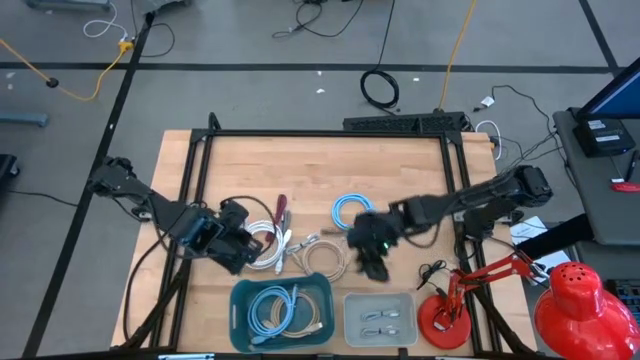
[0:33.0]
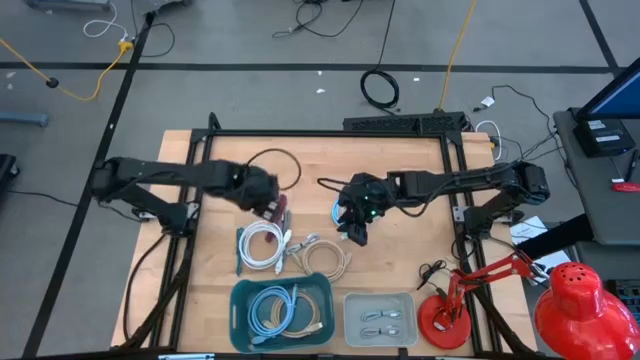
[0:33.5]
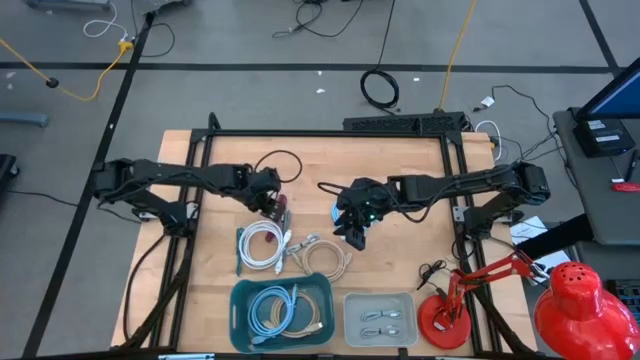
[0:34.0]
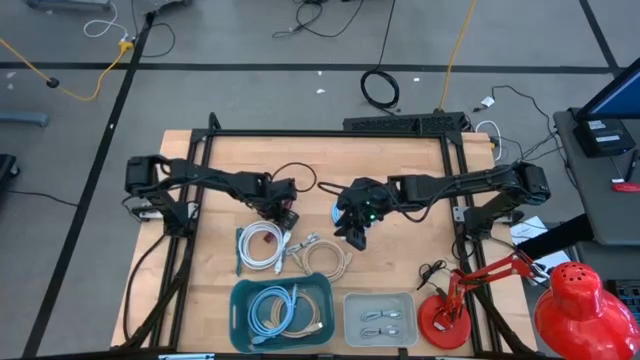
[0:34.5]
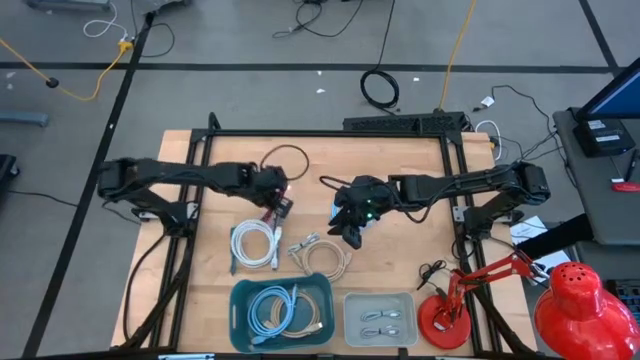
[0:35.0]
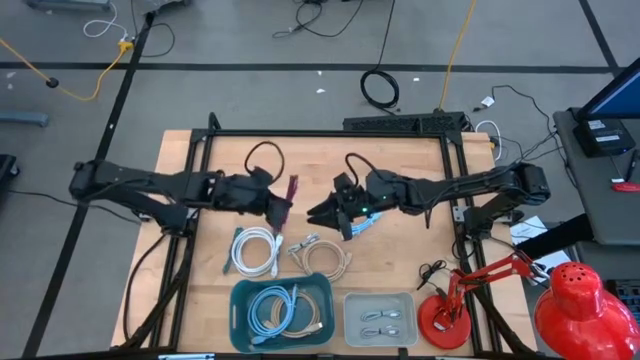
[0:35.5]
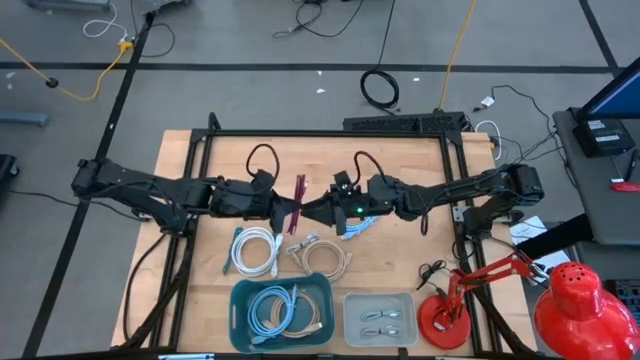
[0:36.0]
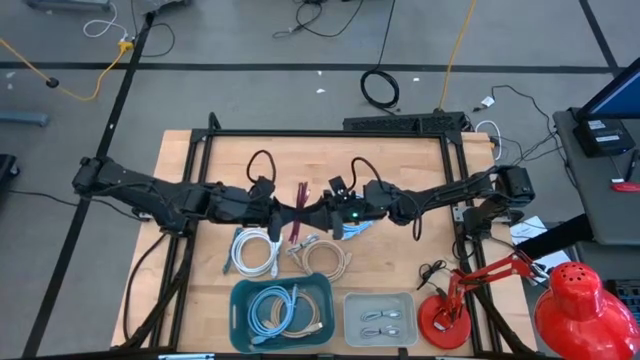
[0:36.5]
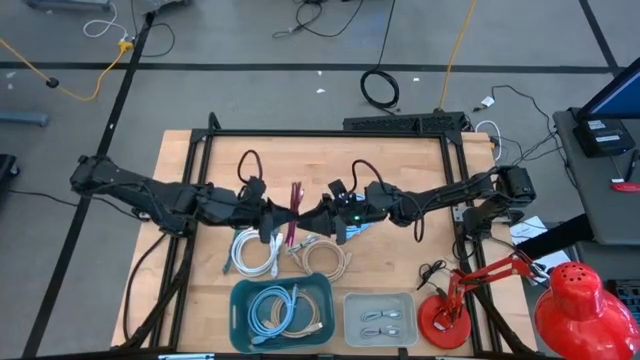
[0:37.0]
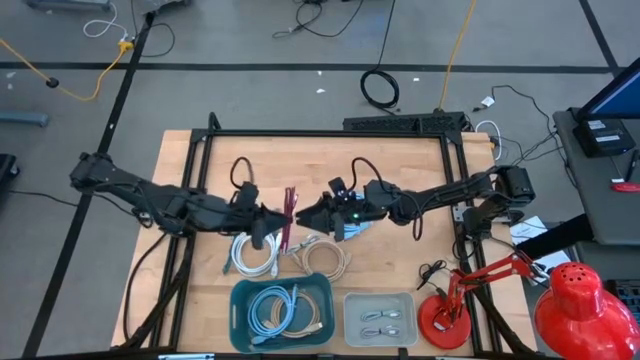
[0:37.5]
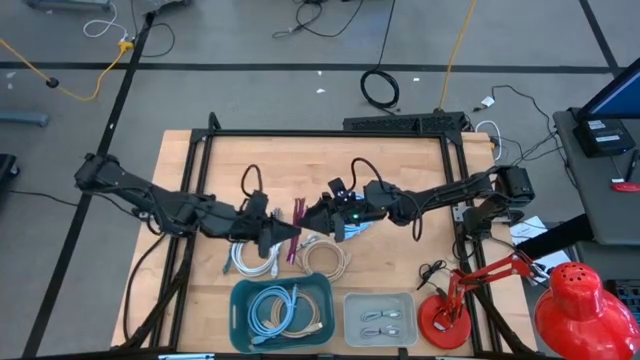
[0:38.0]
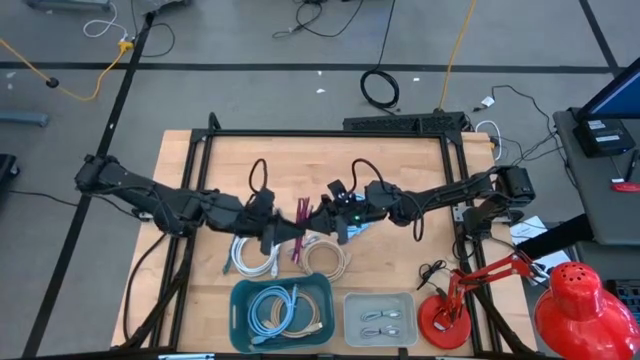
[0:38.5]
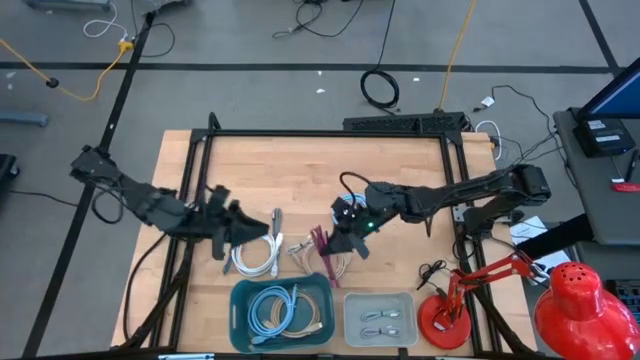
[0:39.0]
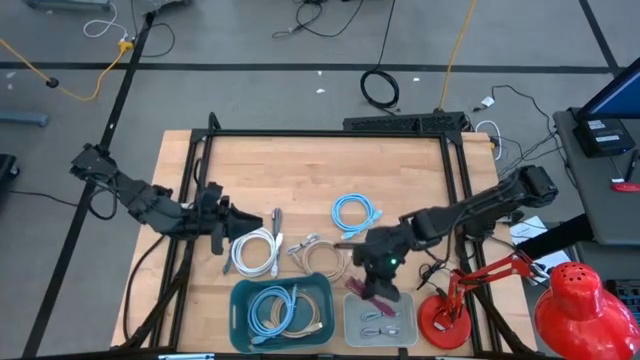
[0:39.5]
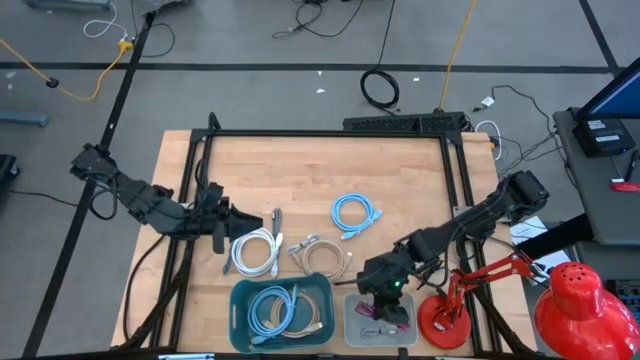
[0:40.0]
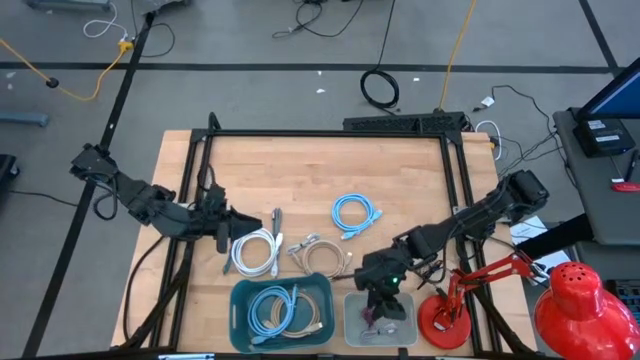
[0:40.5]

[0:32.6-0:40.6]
Task: Pick & Place USB Port
Put the small pink charger cable into the grey bin

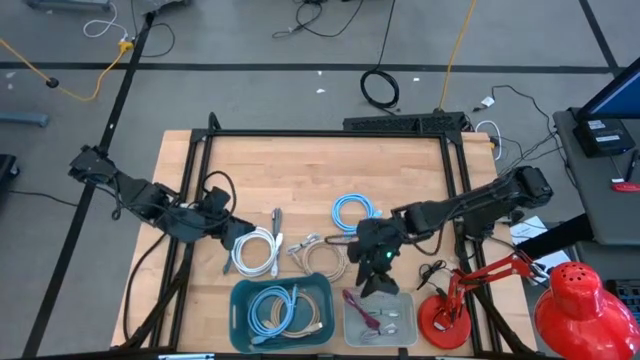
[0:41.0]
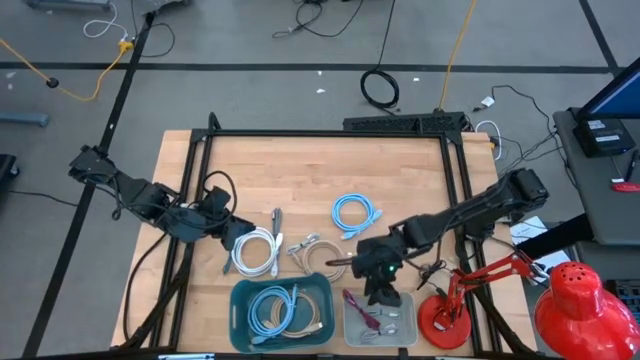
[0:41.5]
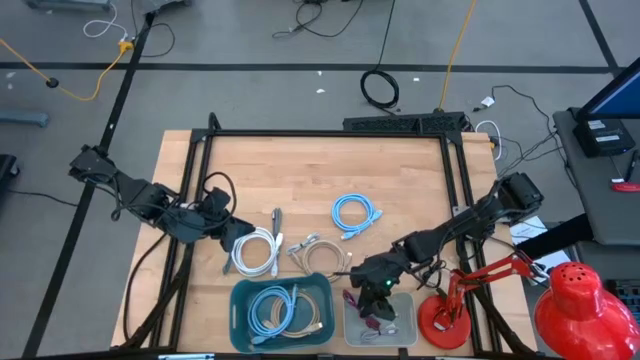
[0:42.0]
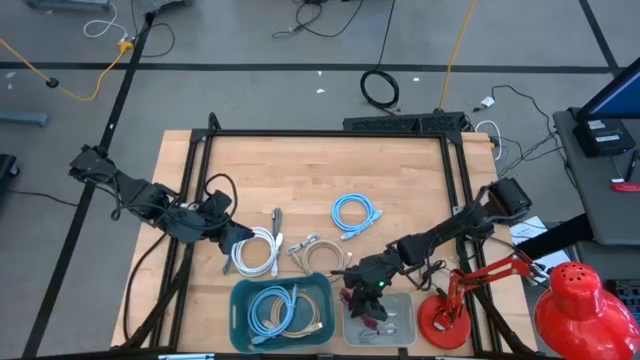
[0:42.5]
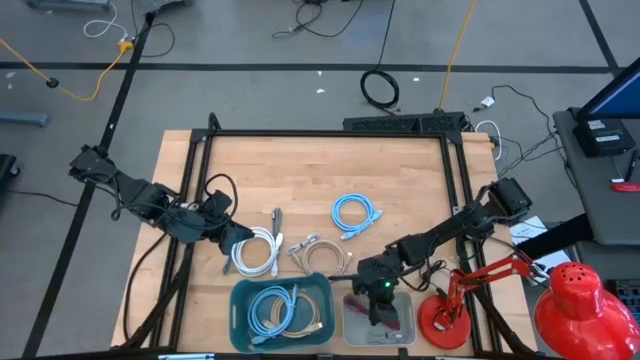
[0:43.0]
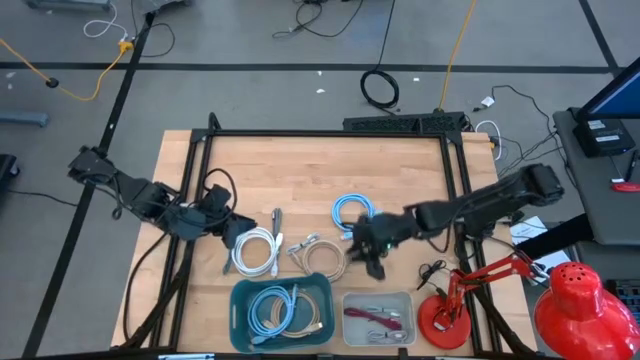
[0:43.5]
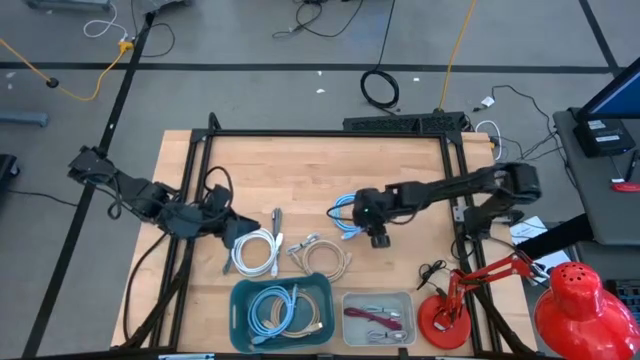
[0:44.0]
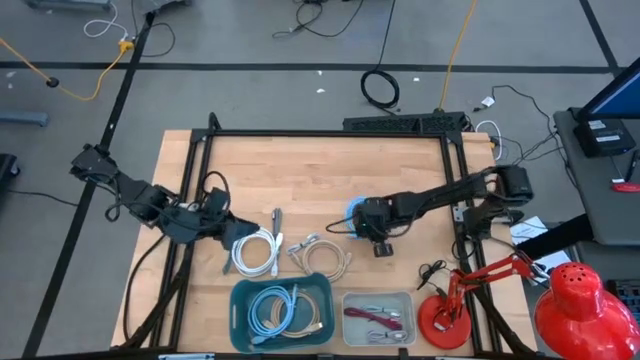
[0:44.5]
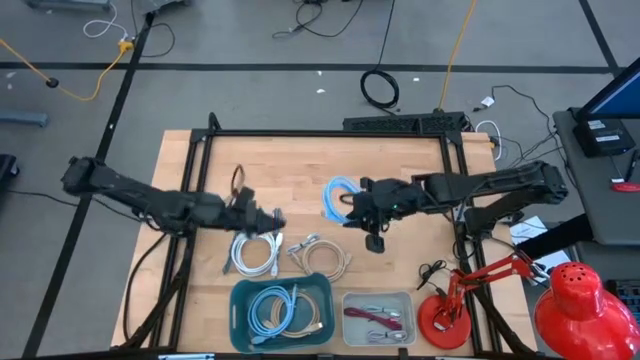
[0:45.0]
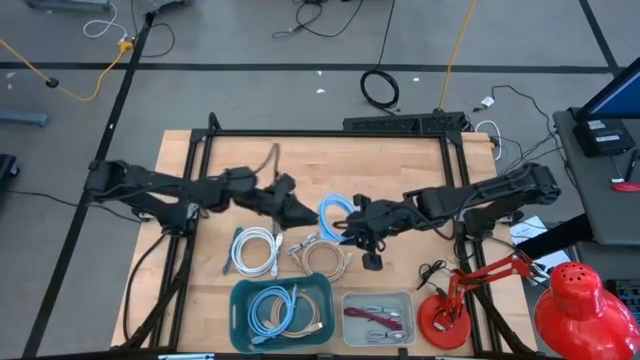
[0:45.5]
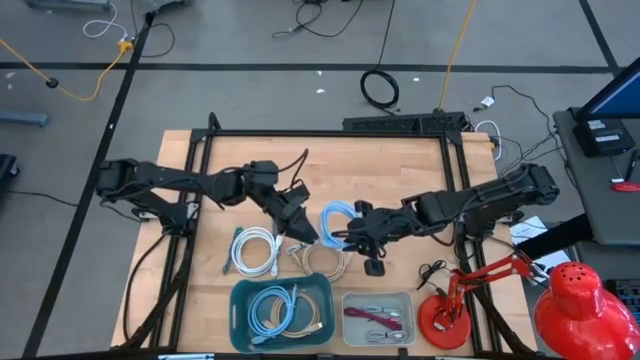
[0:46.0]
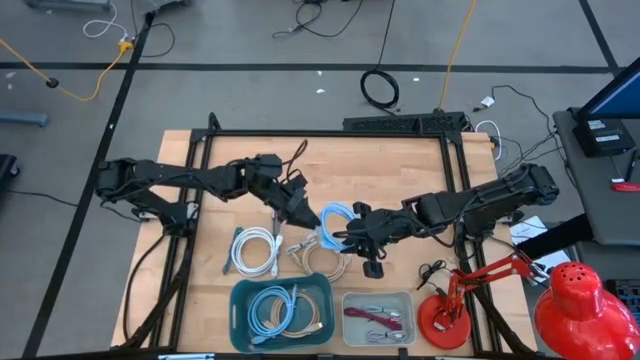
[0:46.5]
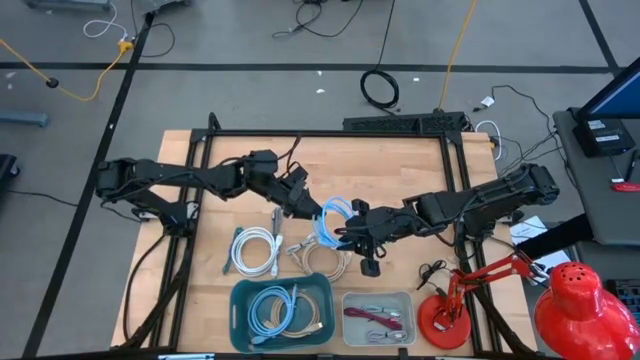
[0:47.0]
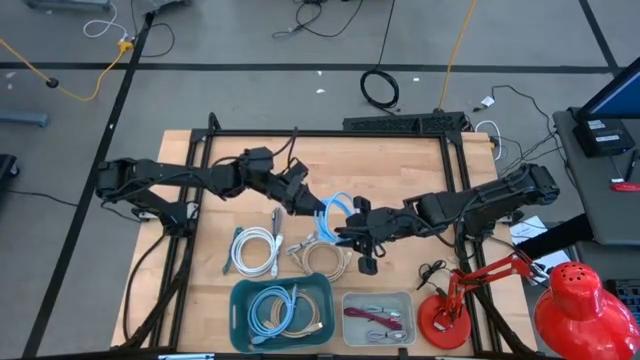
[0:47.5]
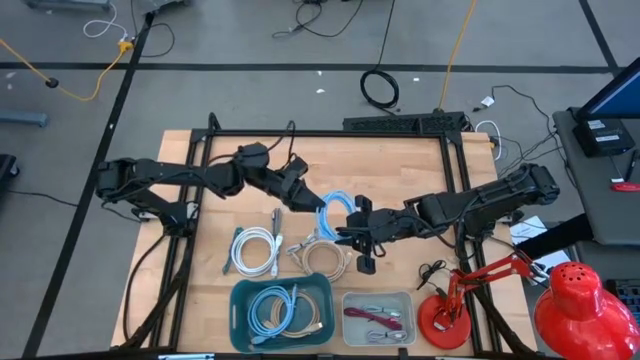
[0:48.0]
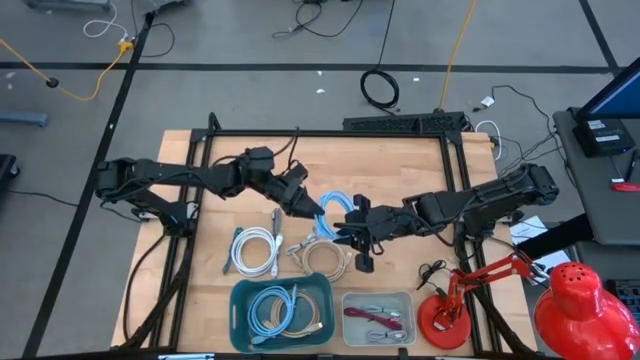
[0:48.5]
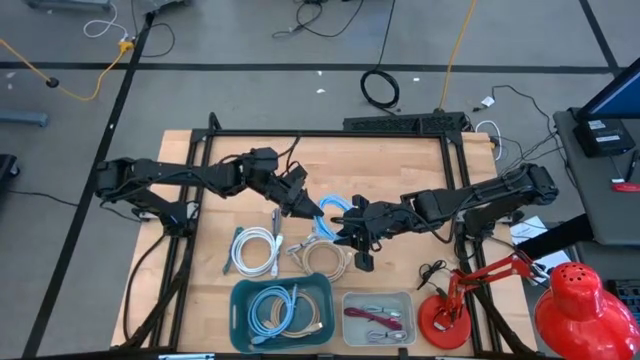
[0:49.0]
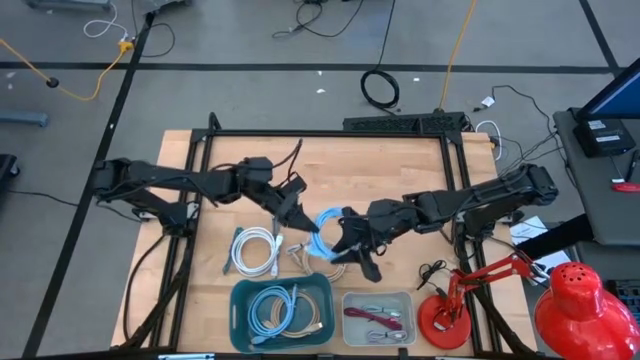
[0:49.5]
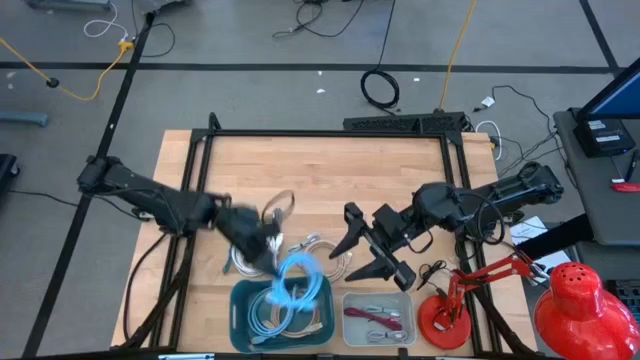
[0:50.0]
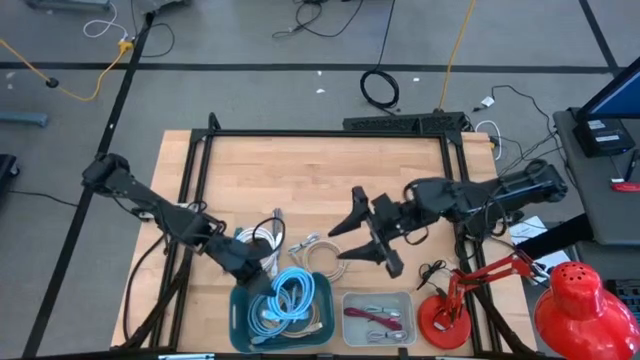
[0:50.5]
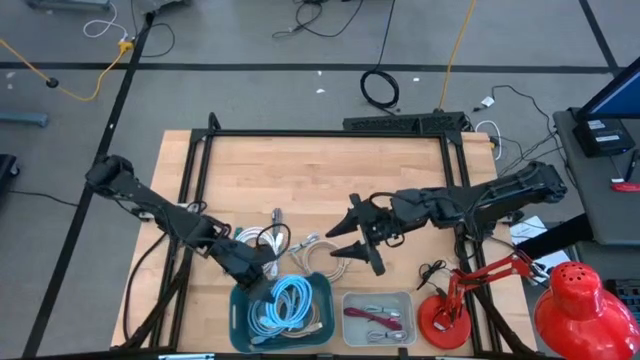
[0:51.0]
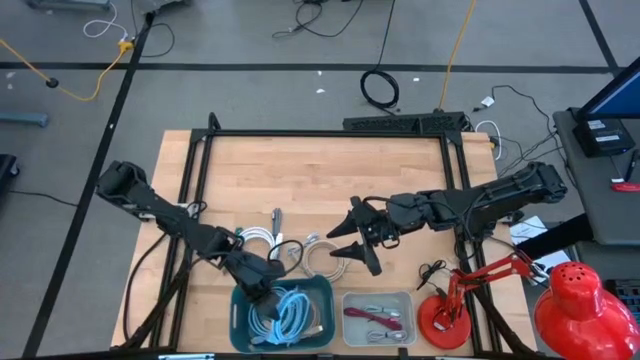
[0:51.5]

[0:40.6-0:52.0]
Put the large blue charger cable into the dark blue bin

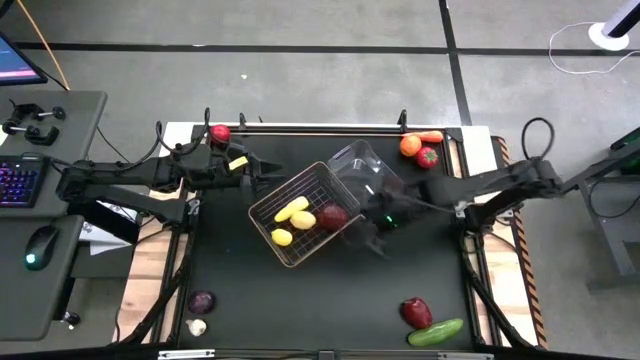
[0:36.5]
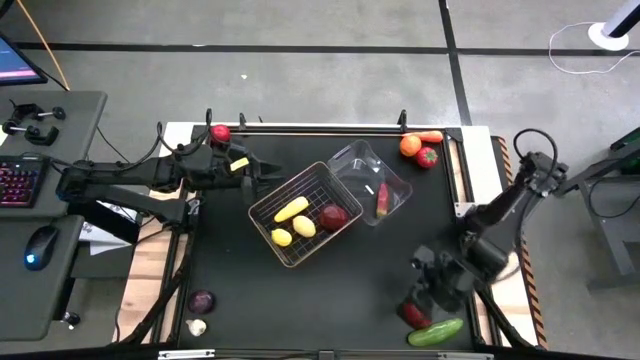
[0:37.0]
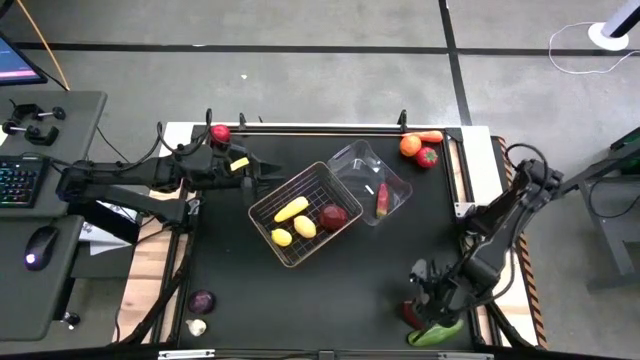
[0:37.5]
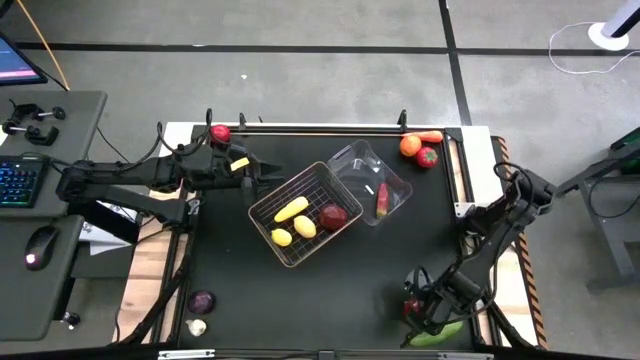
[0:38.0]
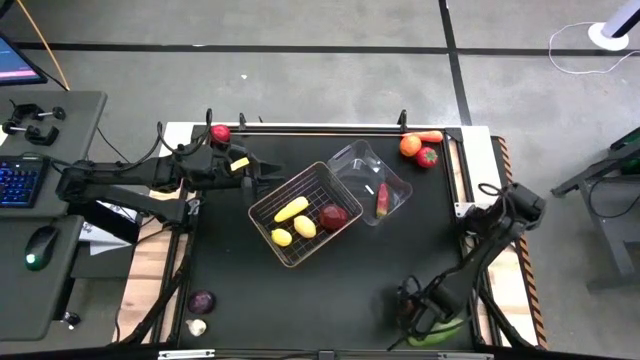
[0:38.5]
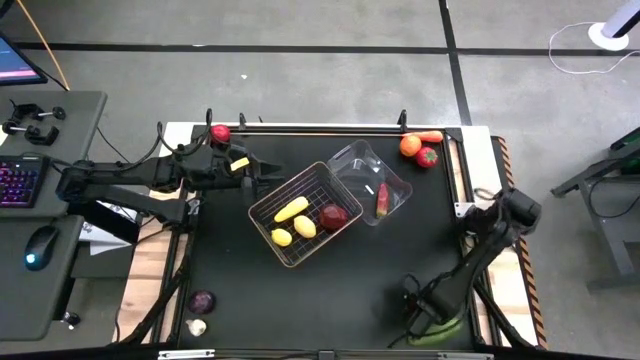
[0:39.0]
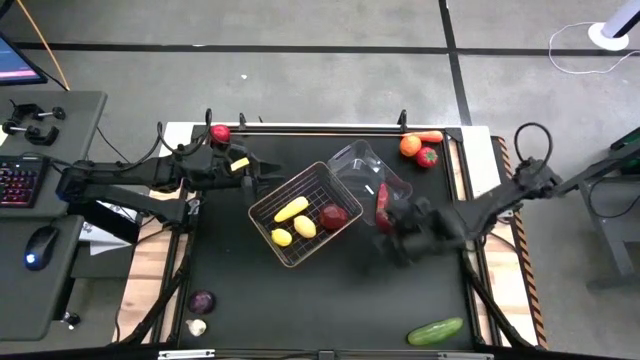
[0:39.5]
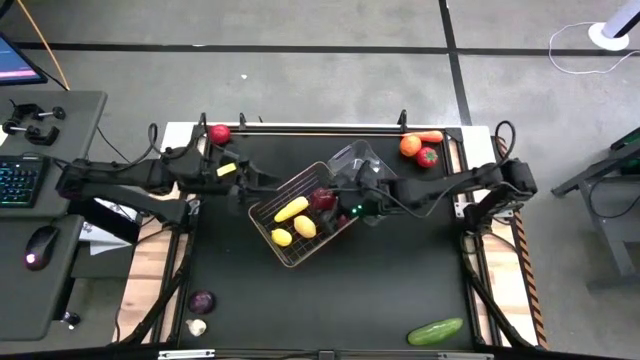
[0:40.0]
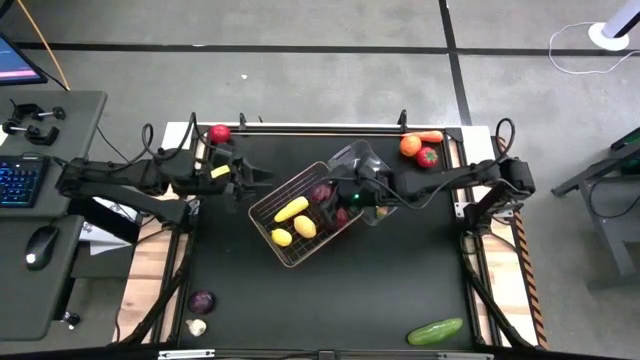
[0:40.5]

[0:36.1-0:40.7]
Task: Sort produce into baskets
Put the apple into the gold wire basket
